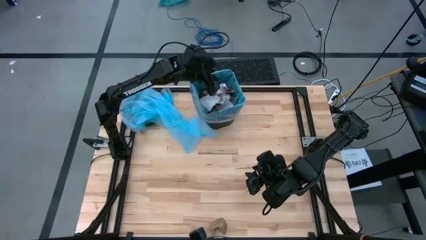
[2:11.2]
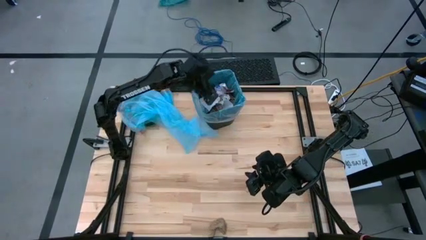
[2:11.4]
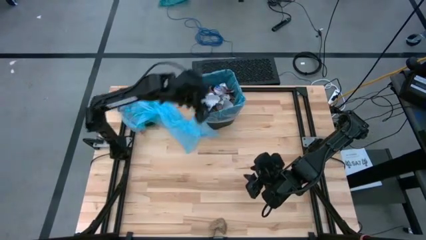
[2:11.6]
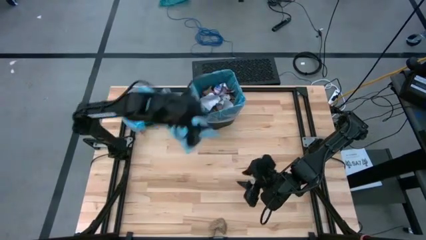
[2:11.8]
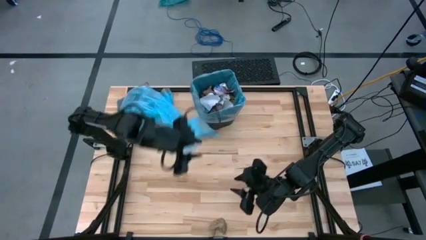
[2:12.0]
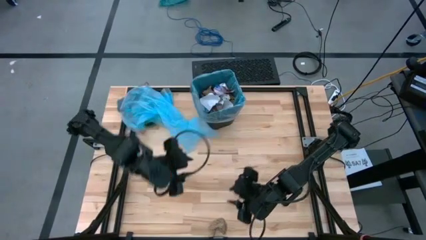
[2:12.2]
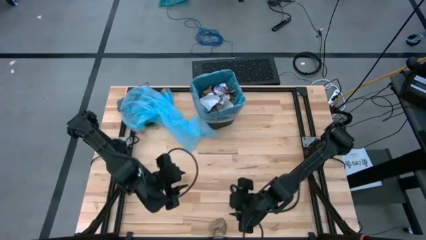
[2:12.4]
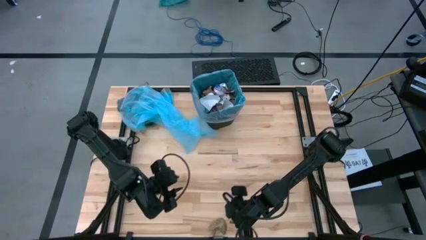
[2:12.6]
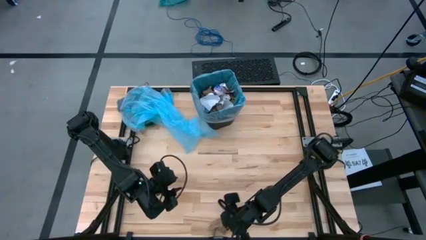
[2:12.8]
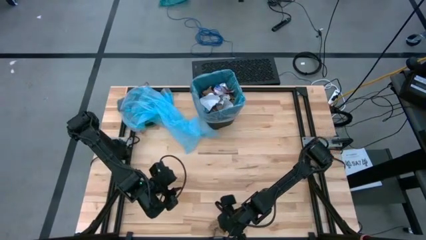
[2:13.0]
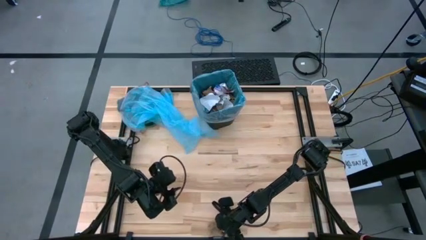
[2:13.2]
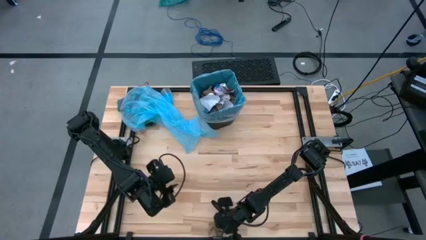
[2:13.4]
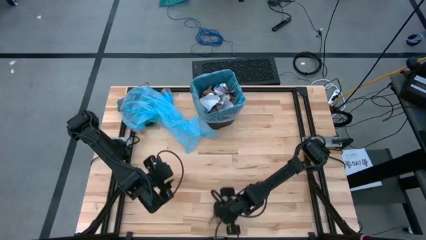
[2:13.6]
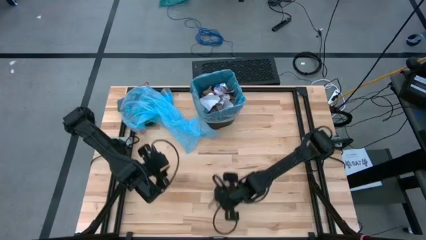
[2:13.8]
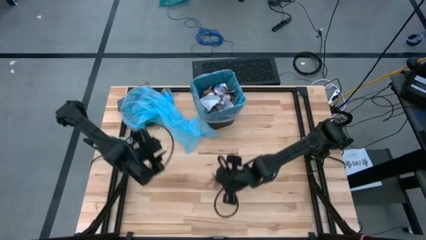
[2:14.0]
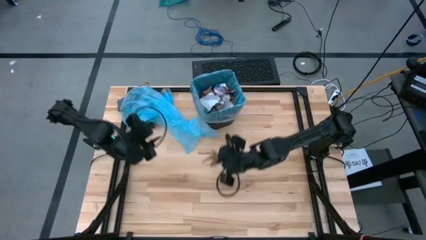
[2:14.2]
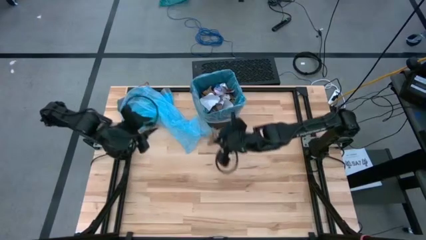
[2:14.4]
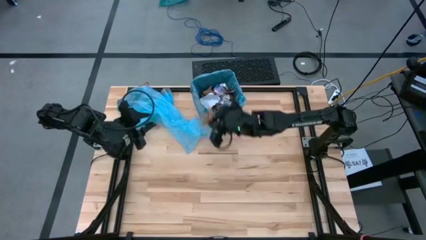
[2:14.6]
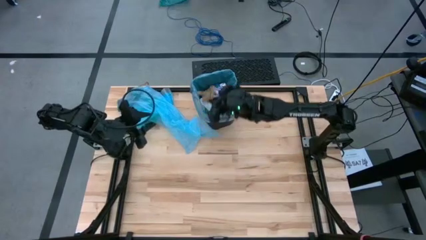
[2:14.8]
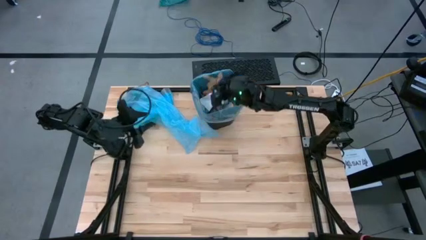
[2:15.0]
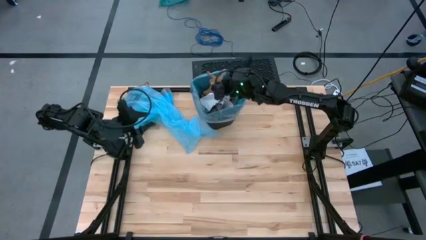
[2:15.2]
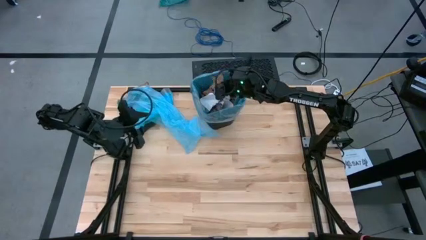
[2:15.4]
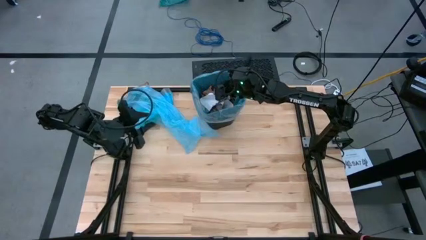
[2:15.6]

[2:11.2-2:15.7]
Task: place trash/remove bag and relplace
Put the brown paper into the trash bin

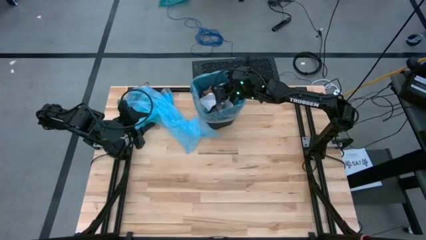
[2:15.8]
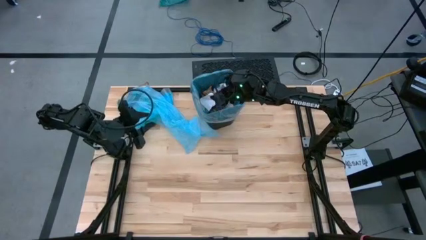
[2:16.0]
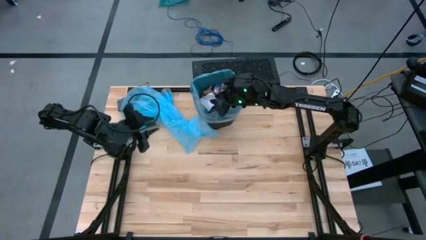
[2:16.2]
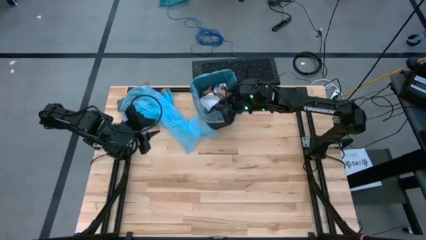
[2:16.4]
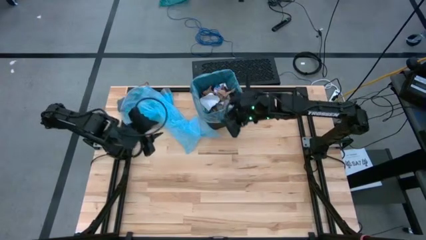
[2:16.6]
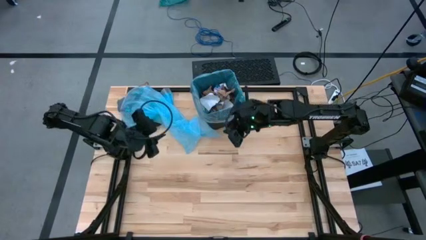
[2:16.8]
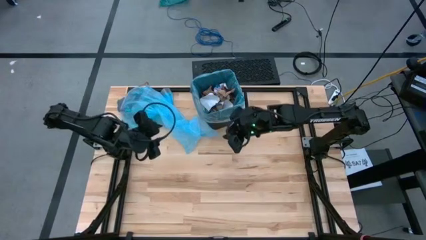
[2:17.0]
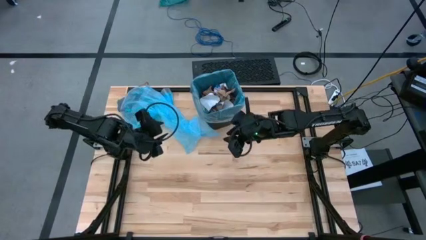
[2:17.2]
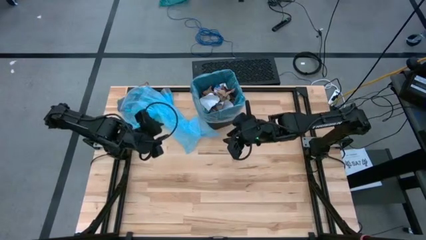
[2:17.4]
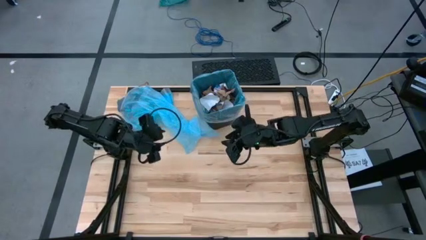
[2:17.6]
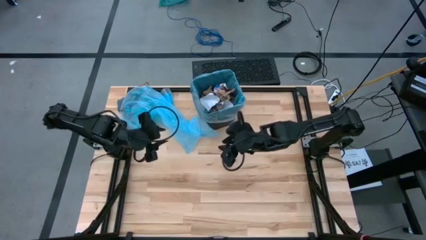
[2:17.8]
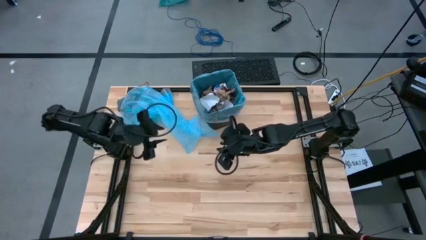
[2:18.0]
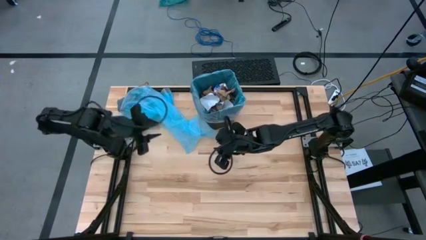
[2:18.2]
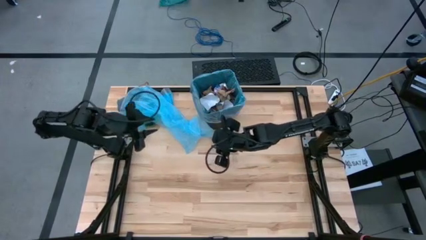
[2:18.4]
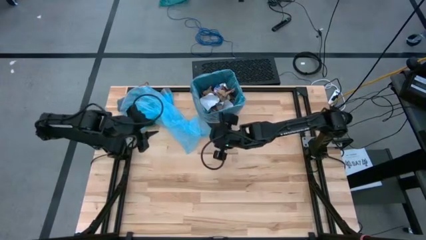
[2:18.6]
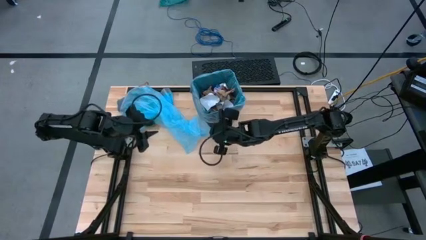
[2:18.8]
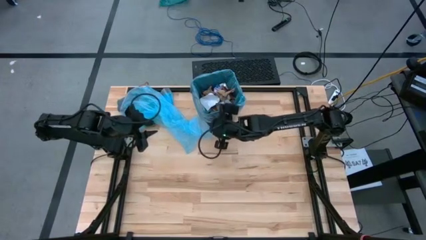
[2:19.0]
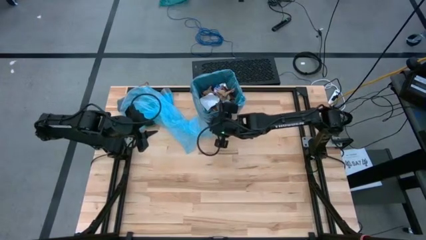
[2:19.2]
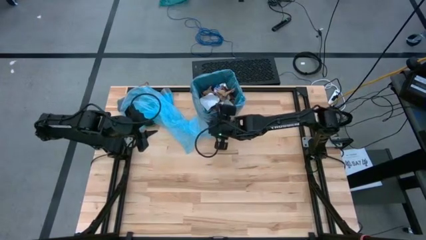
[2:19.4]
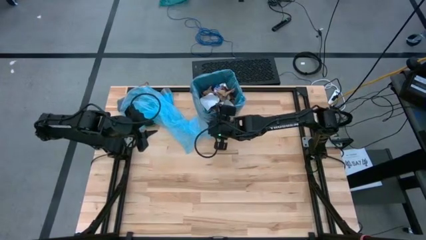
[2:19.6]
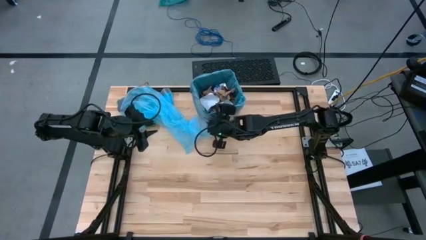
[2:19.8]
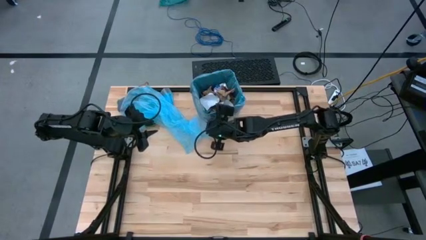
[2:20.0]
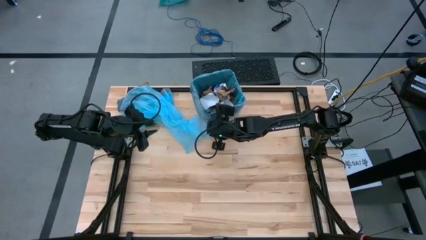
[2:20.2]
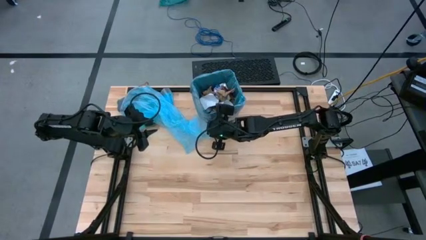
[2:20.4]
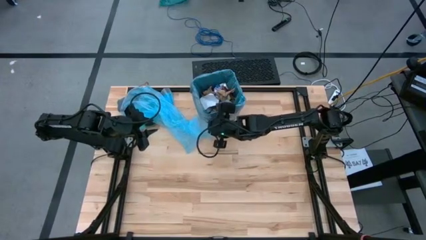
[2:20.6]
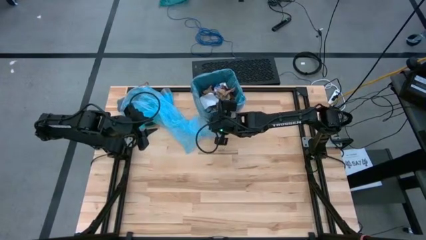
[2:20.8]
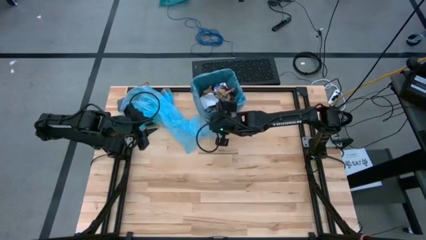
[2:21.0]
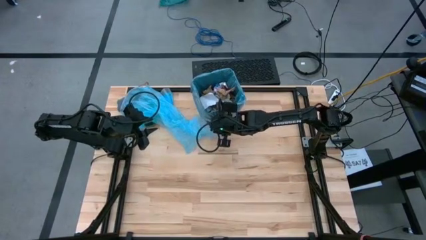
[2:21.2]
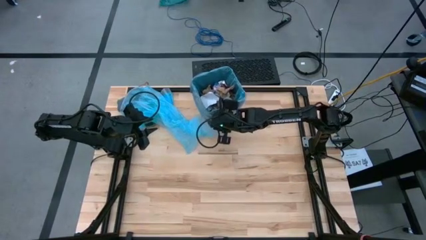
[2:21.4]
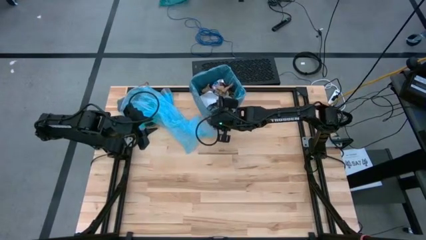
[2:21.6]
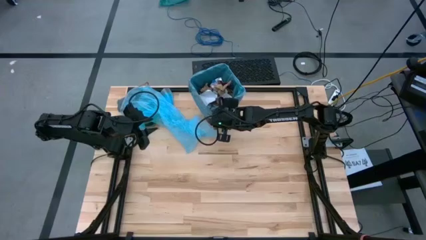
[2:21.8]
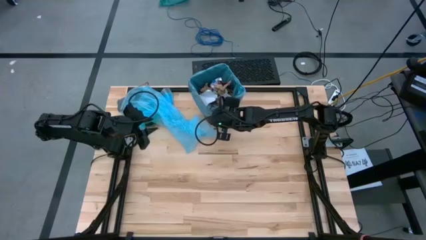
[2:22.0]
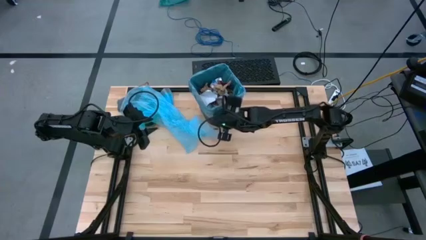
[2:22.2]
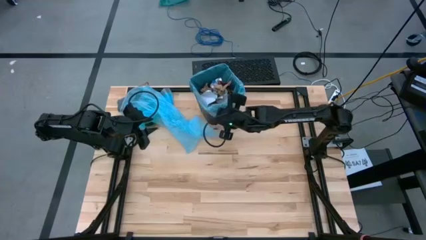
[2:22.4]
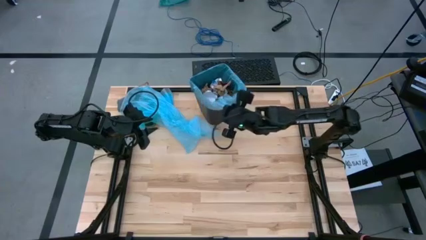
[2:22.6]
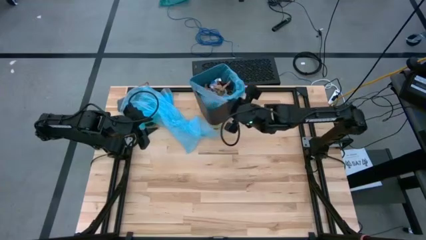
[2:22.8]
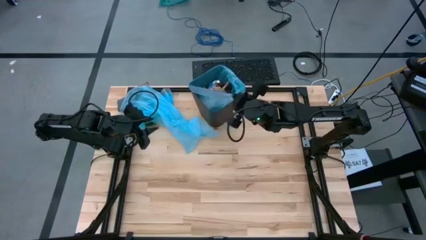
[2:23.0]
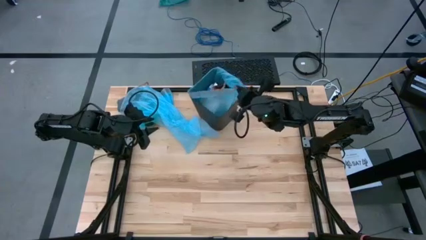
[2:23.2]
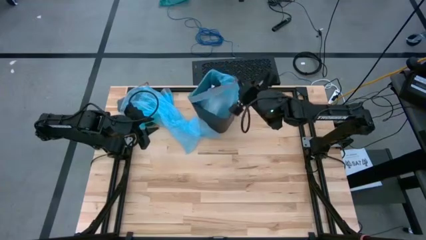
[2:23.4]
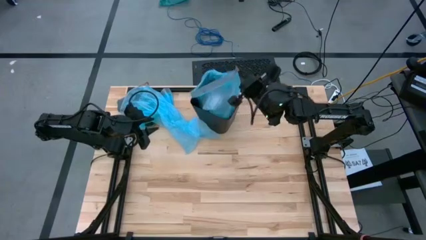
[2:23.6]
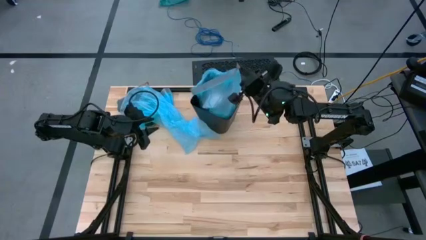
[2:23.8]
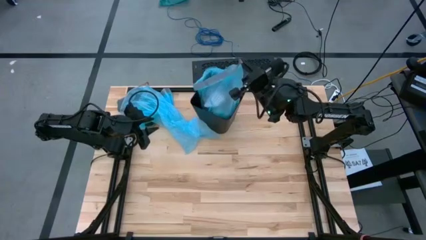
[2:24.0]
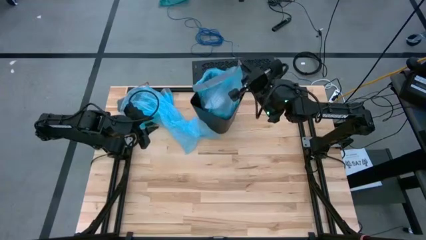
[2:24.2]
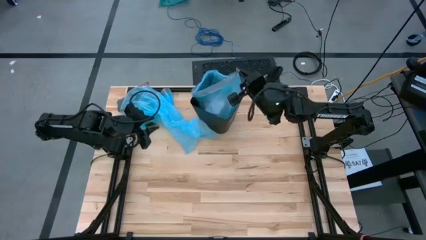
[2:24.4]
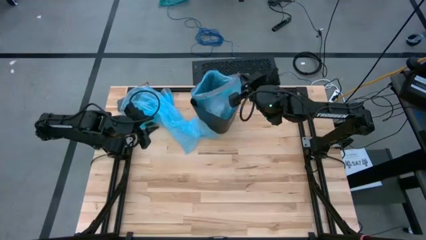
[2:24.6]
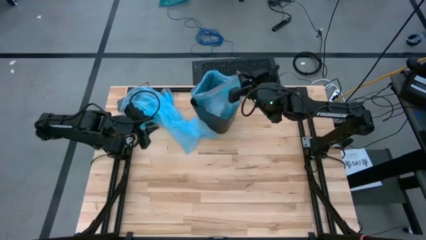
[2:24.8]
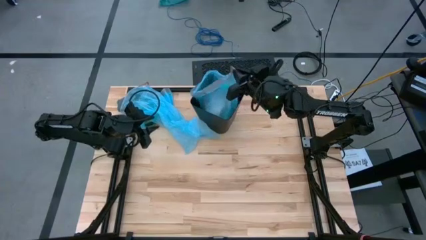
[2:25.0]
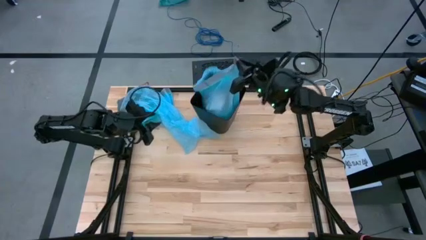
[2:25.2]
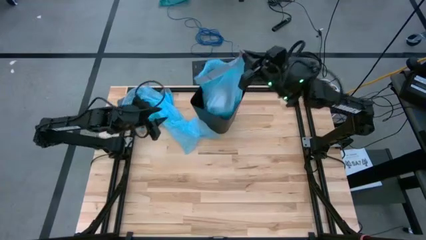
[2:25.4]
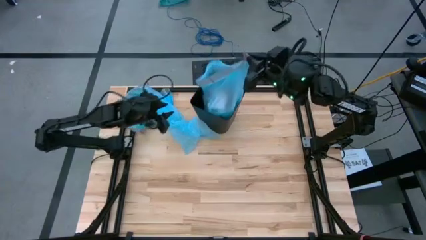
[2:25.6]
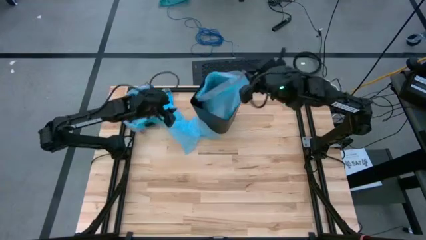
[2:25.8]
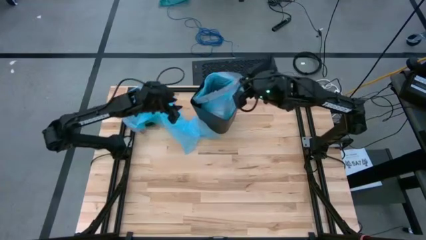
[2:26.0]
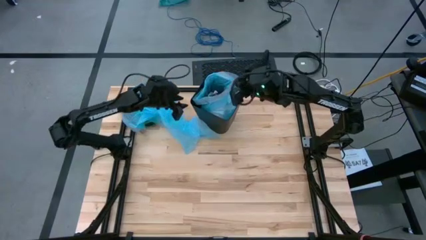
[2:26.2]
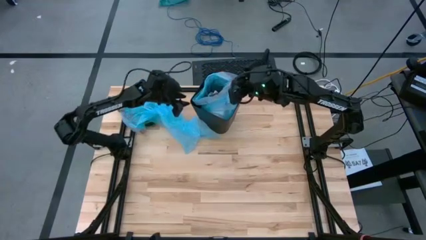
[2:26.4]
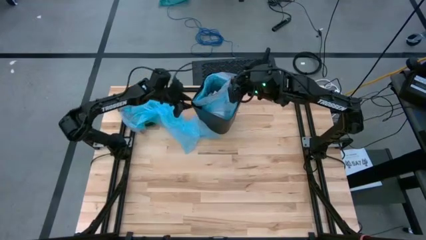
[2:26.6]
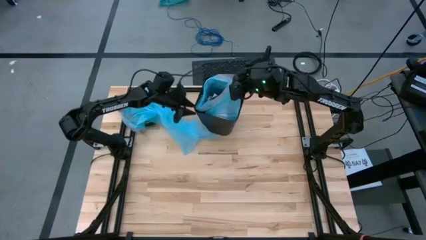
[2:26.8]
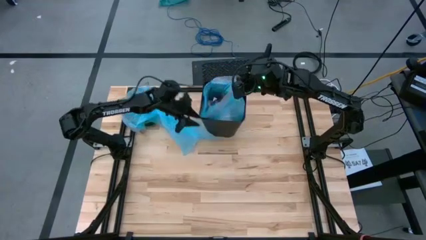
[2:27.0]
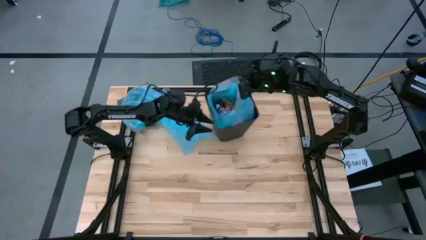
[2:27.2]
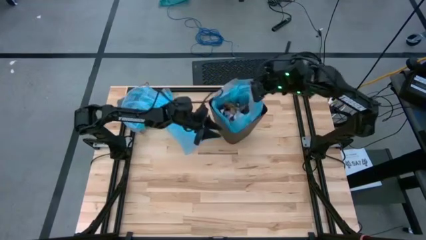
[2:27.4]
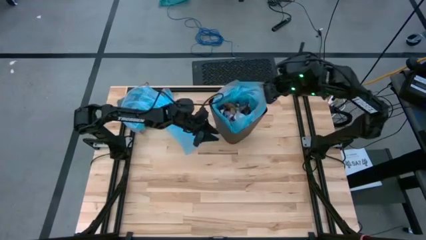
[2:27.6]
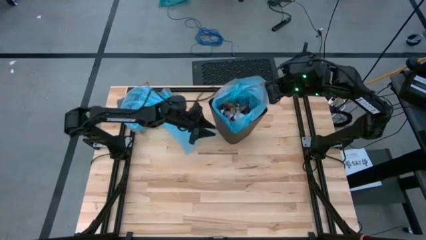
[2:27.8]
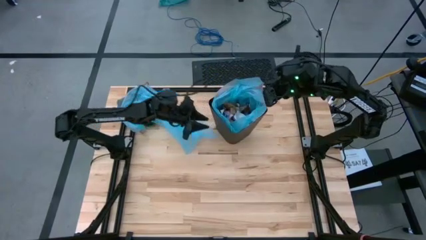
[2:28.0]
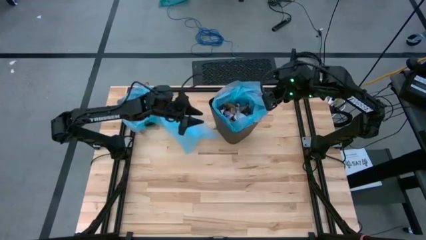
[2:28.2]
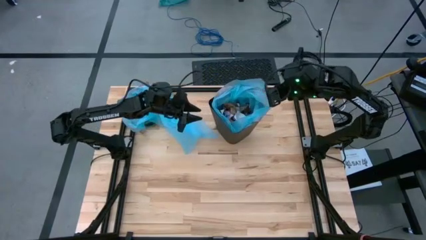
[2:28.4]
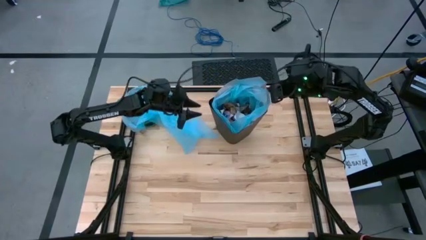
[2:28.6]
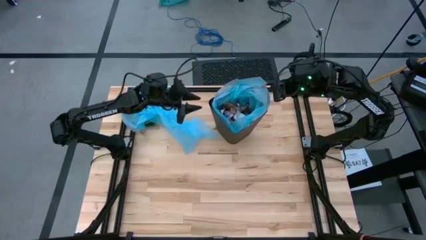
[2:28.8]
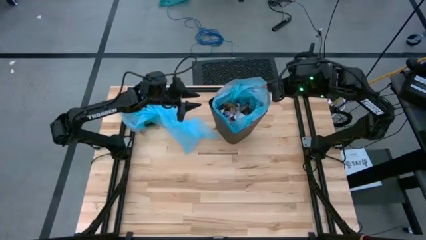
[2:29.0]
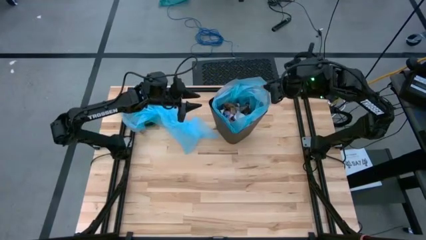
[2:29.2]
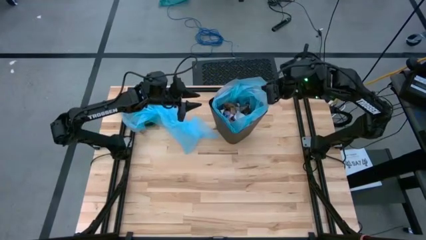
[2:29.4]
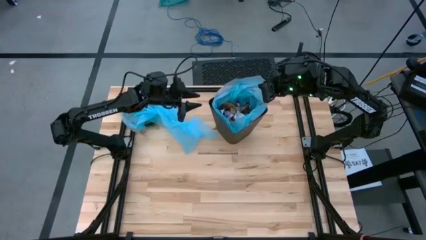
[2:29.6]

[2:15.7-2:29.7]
Remove the blue trash bag from the trash bin
